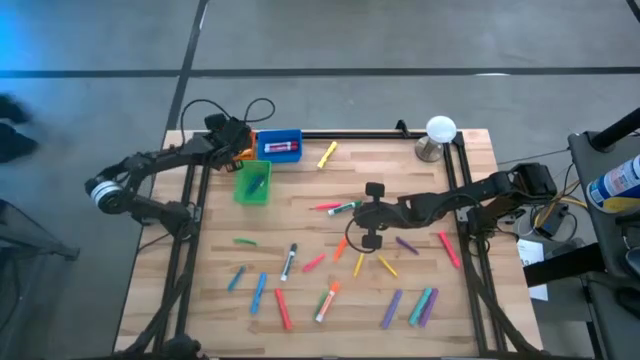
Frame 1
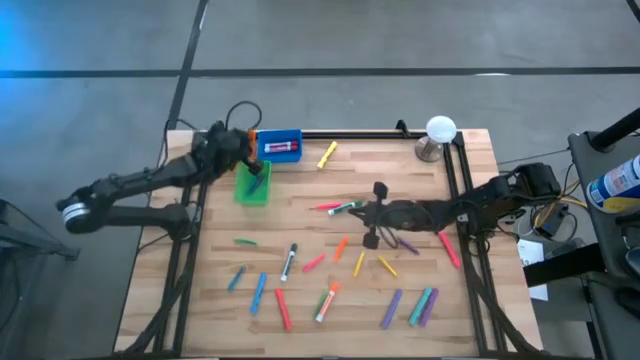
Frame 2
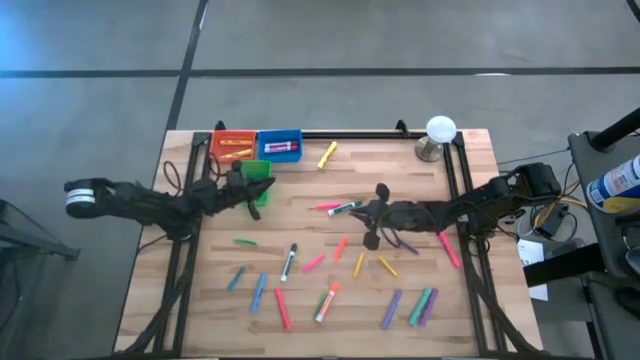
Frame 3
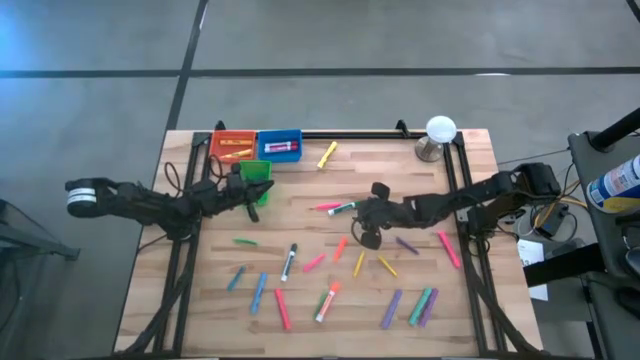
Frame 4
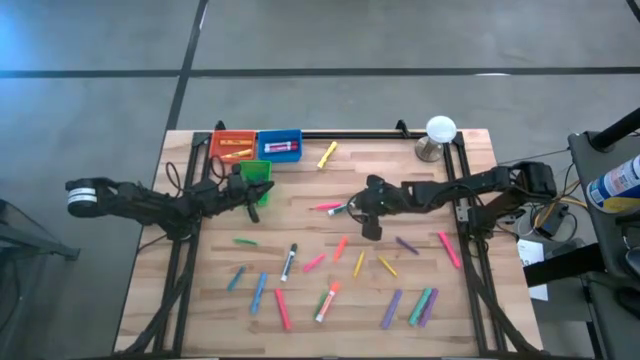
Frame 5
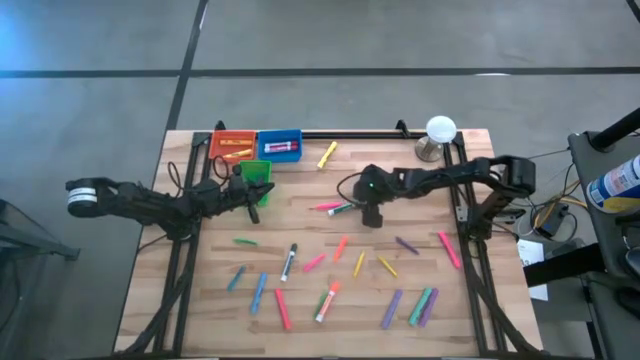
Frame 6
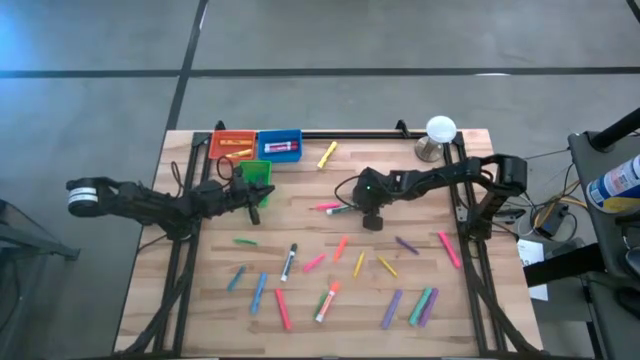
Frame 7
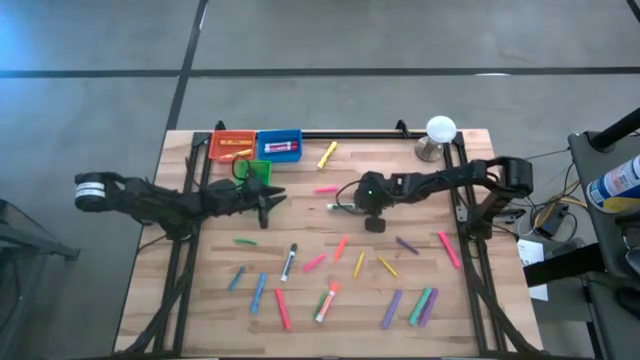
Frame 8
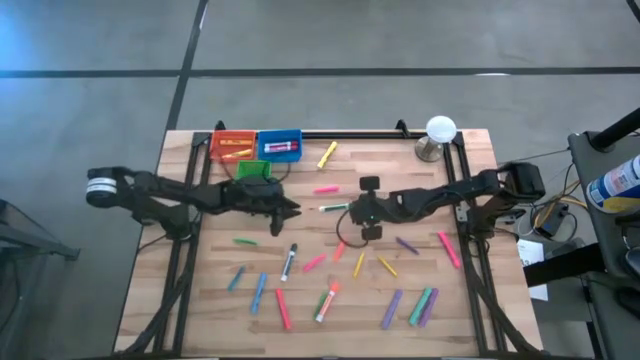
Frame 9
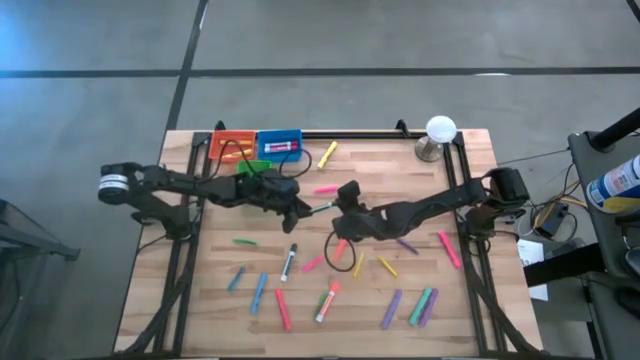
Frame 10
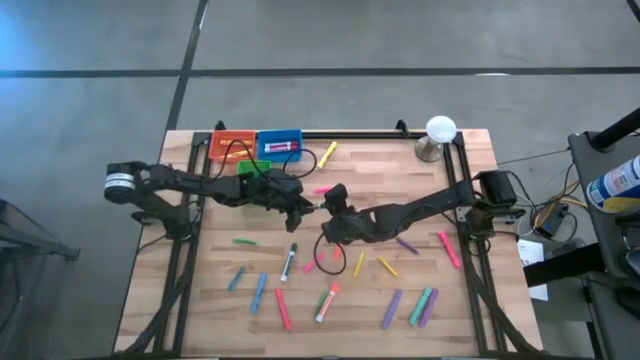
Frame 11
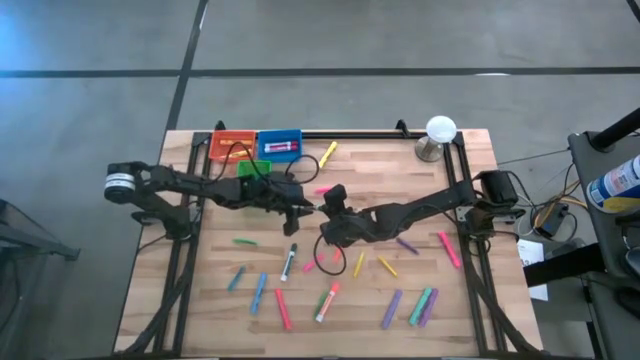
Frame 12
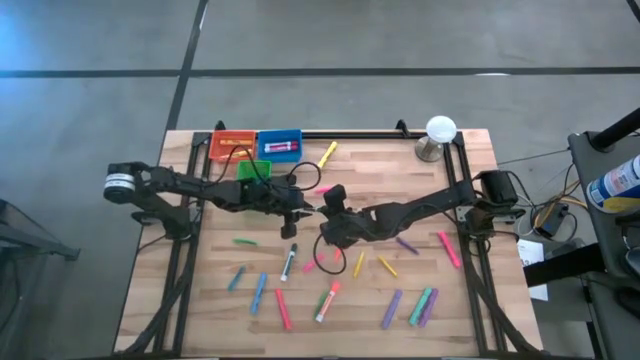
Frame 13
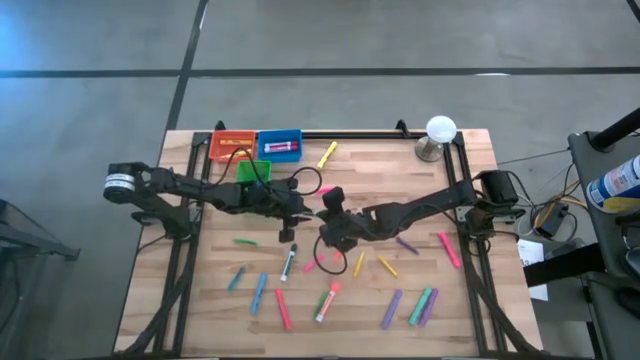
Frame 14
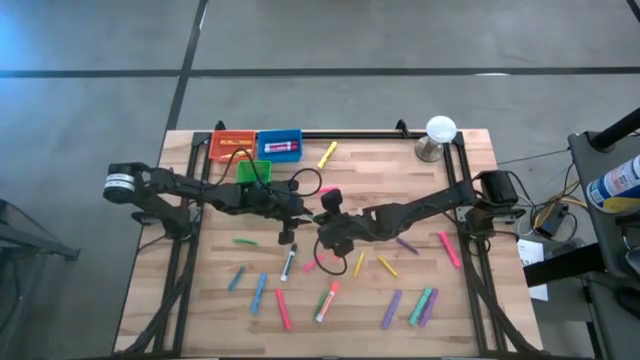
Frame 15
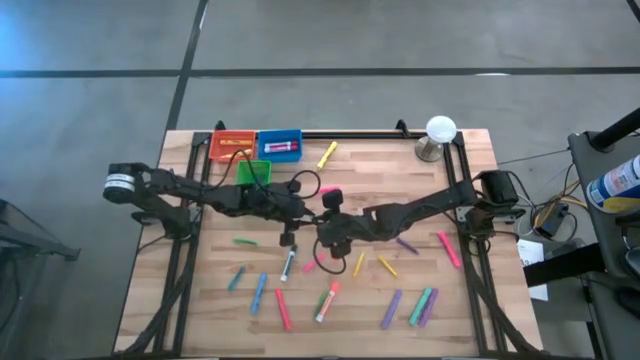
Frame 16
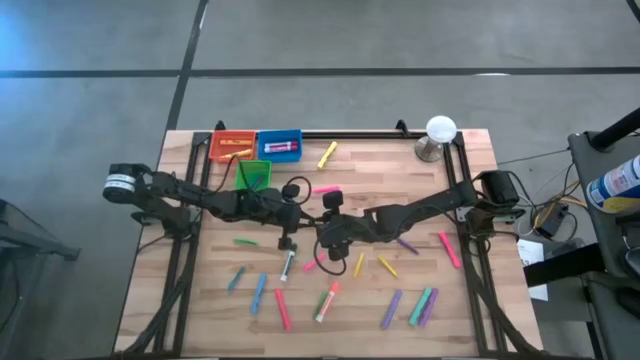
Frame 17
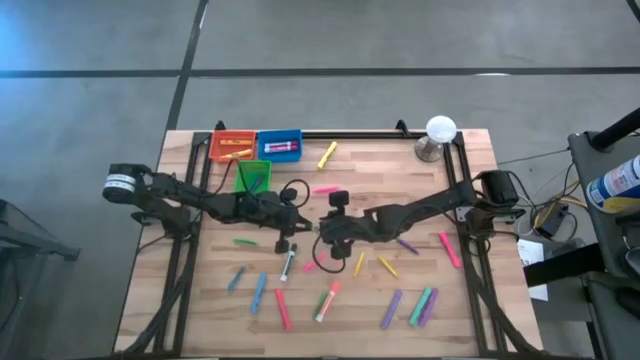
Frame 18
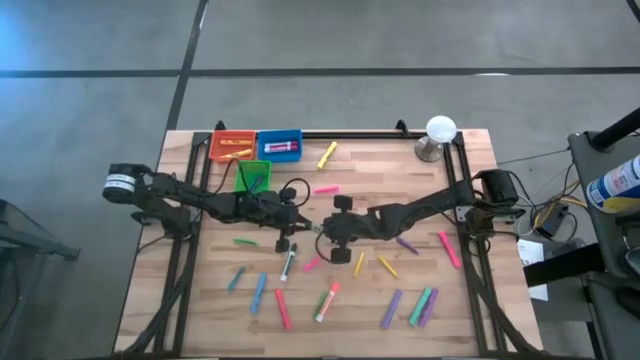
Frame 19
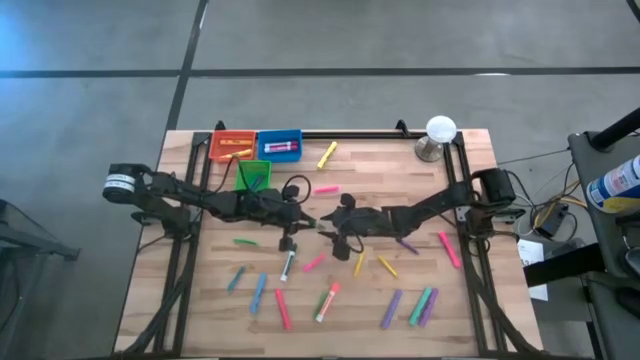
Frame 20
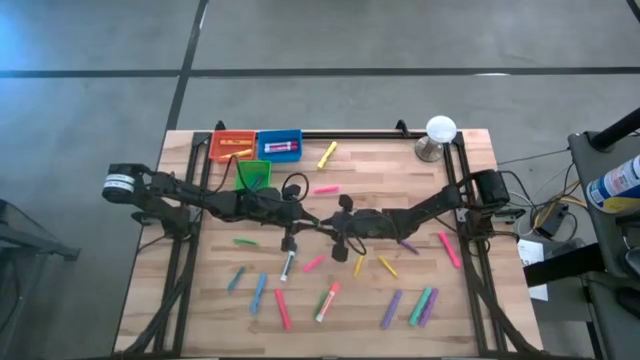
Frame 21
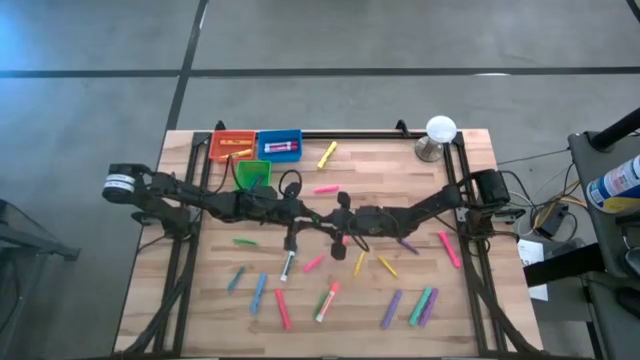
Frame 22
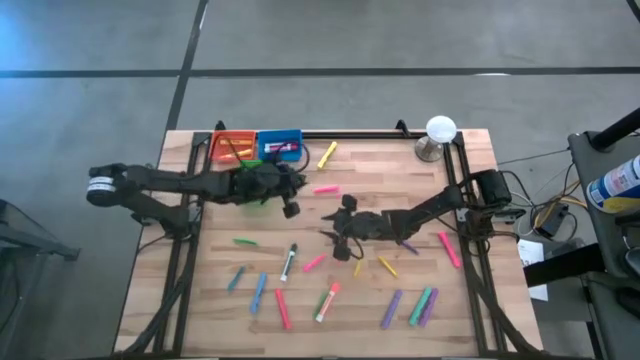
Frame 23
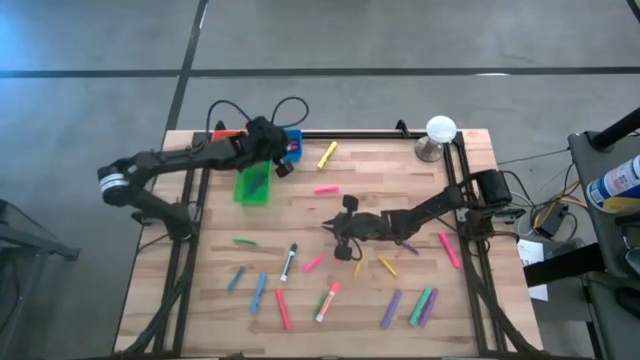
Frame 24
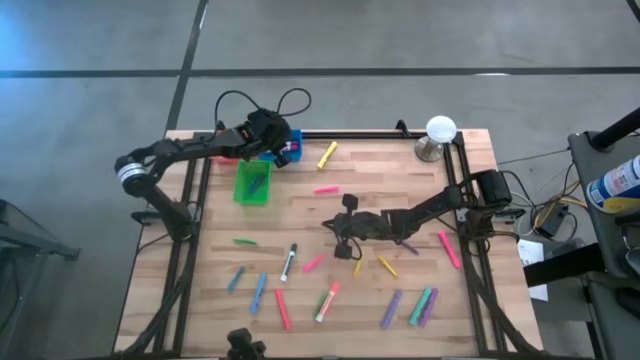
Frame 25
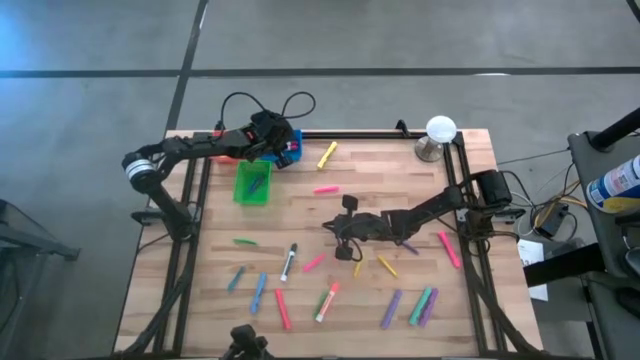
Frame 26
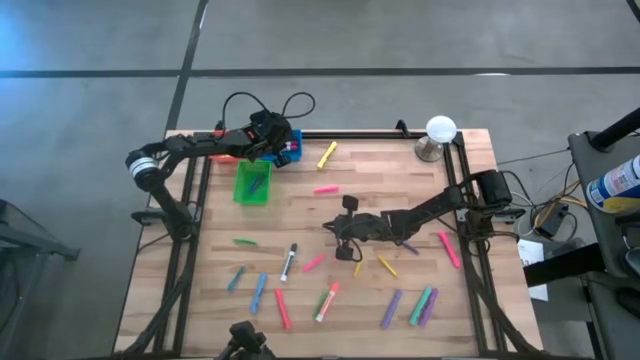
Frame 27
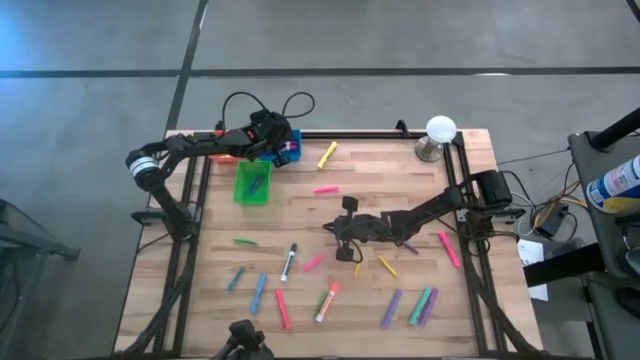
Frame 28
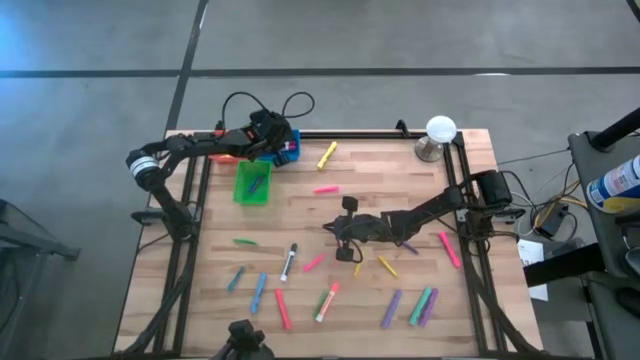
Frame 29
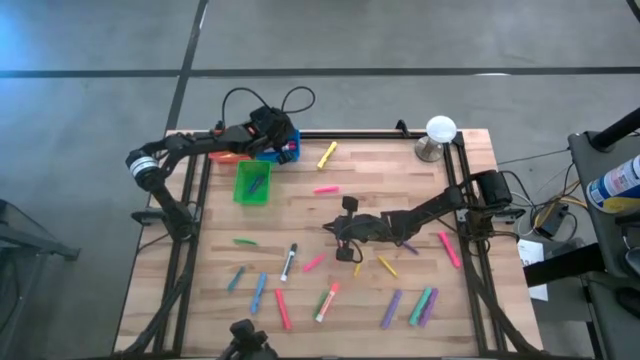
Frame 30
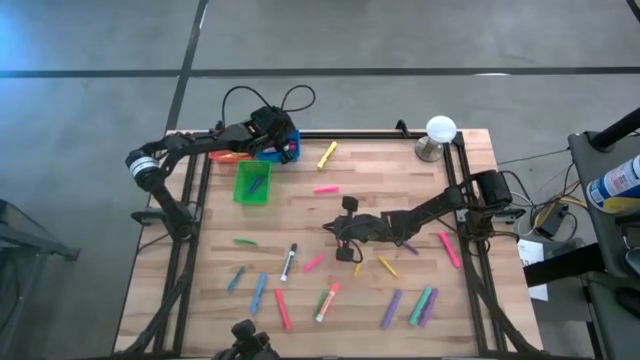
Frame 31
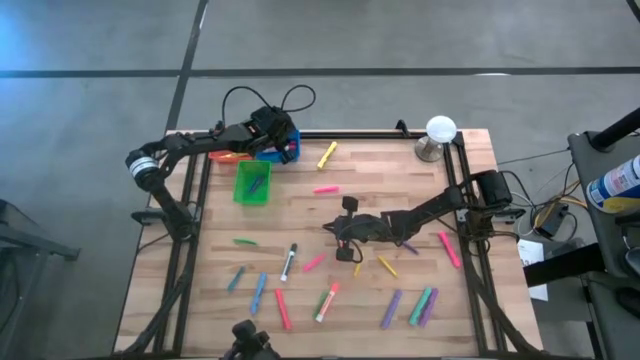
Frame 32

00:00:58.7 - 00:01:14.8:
Task: Pick & Place Markers
Put the green marker into the blue bin

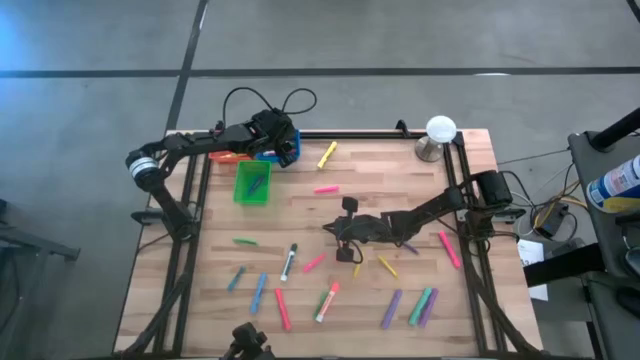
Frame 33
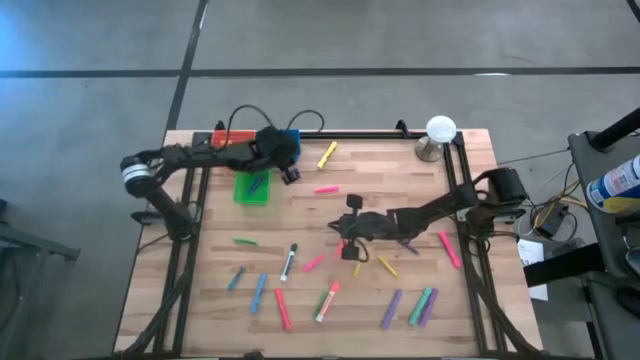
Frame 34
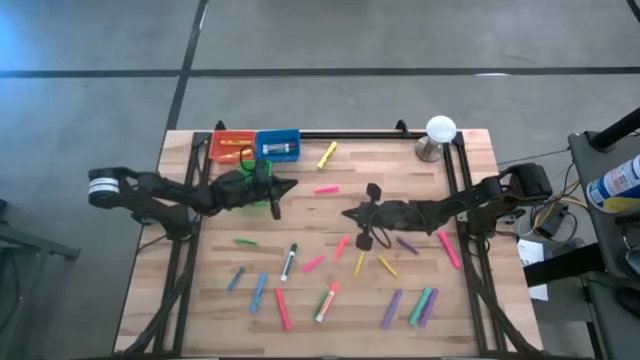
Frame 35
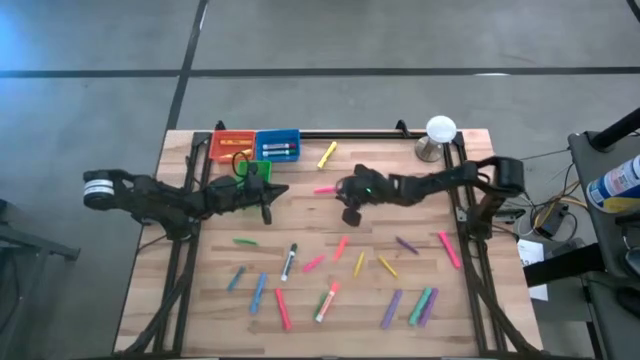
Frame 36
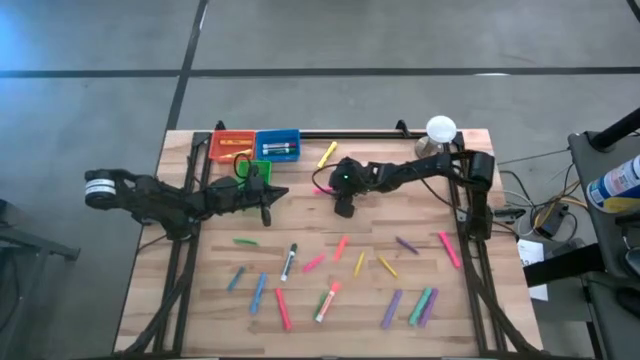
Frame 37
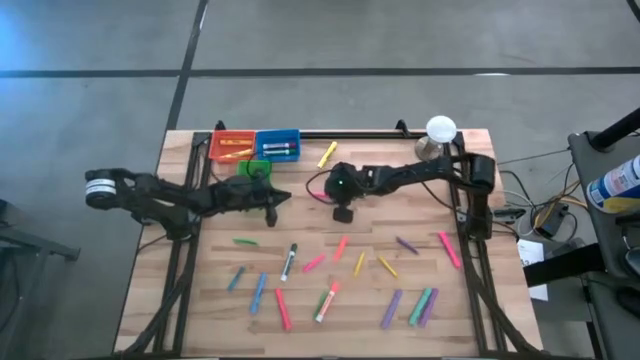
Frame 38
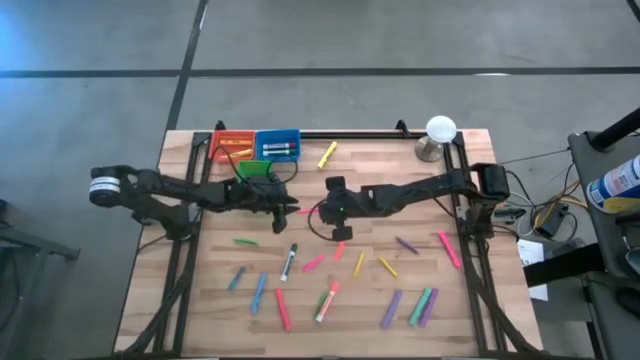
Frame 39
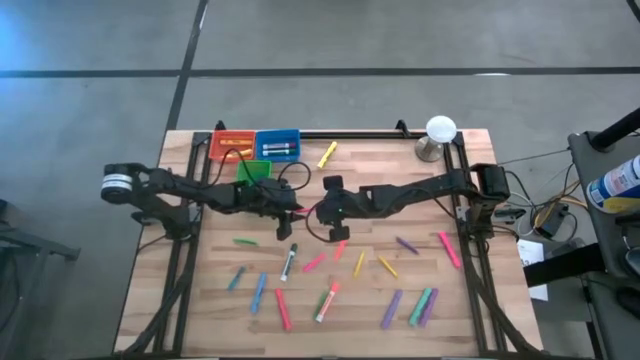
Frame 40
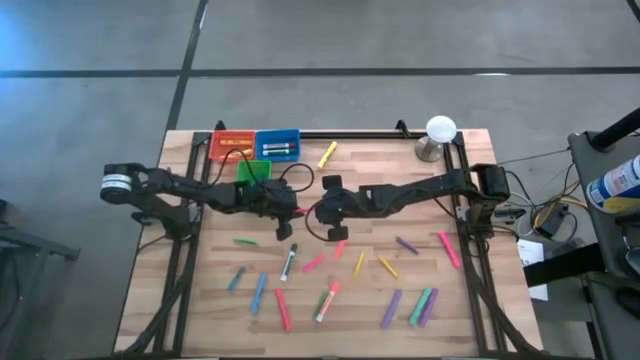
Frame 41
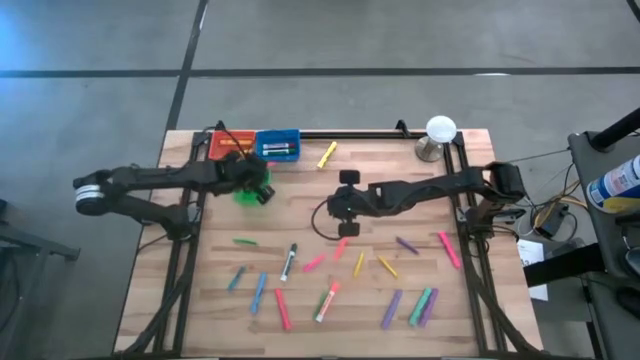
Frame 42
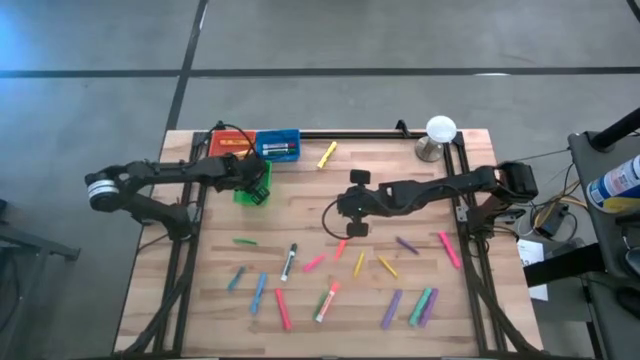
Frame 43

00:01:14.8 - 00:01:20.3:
Put the pink pen into the green bin
